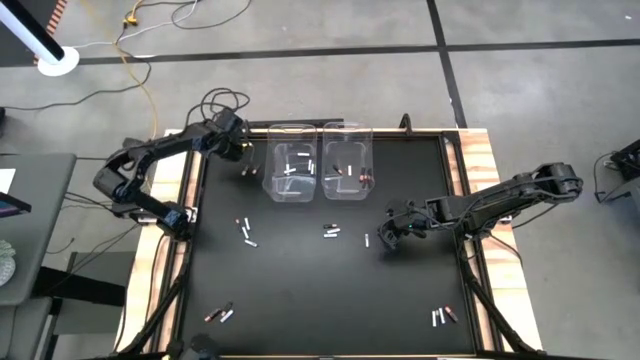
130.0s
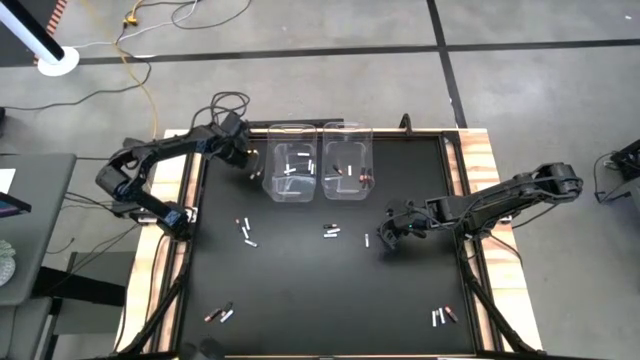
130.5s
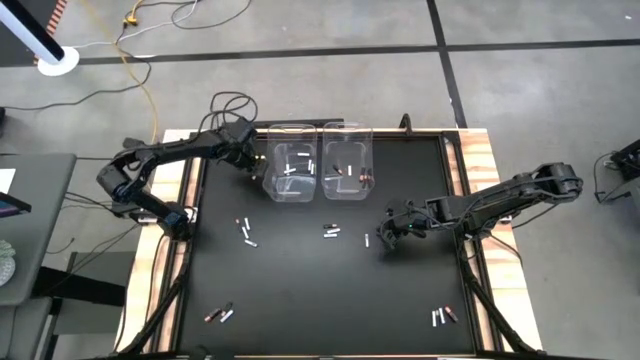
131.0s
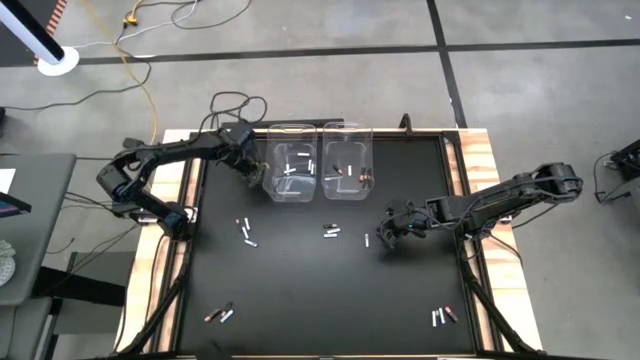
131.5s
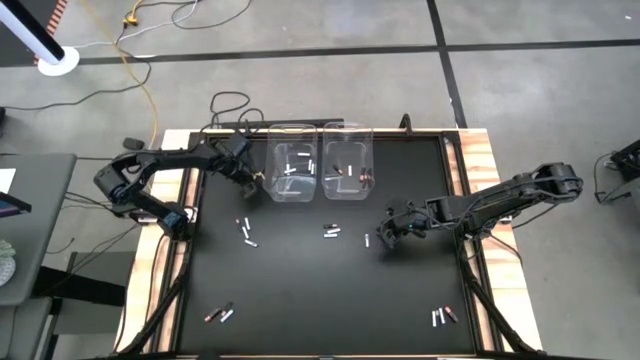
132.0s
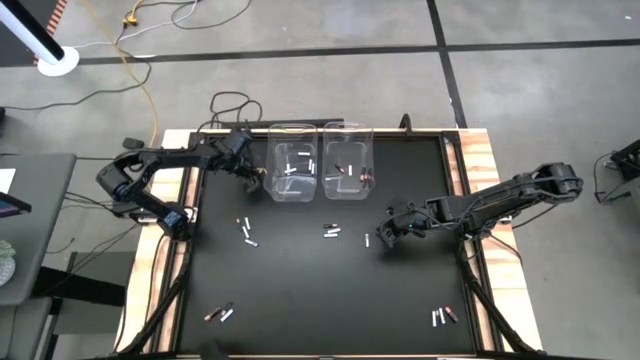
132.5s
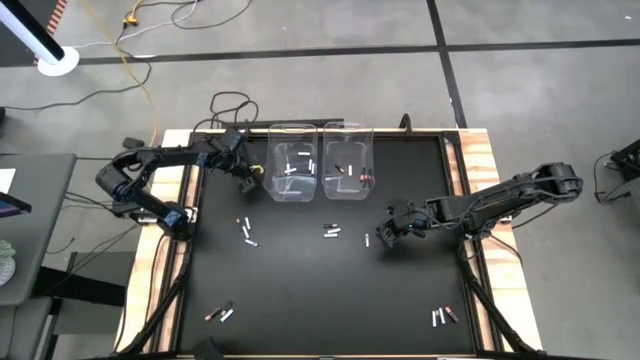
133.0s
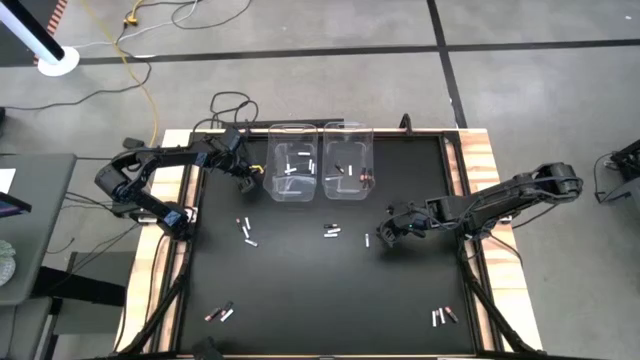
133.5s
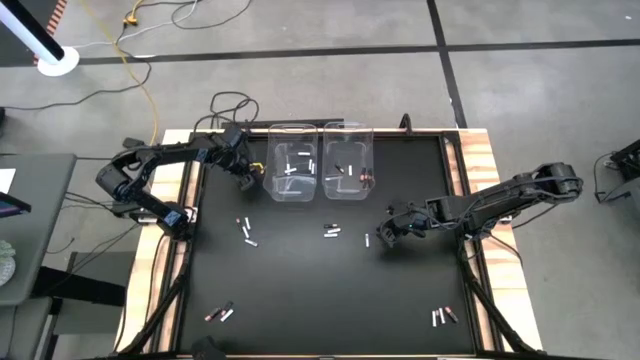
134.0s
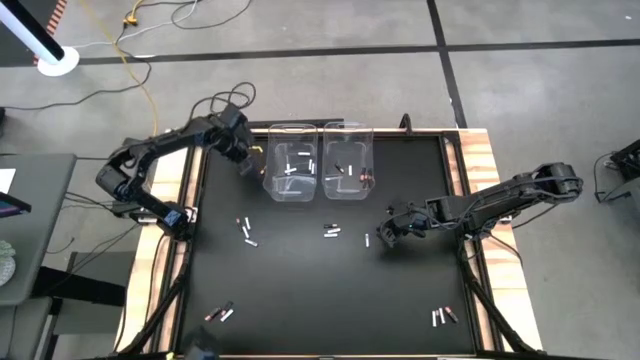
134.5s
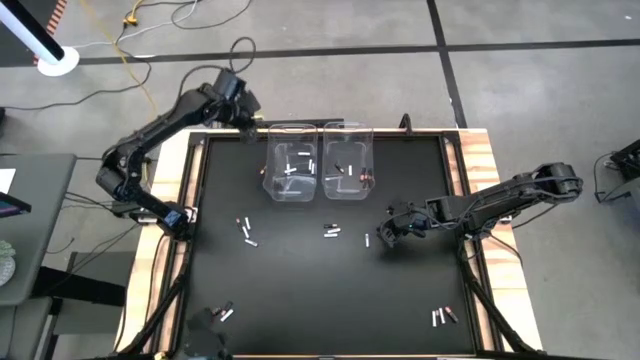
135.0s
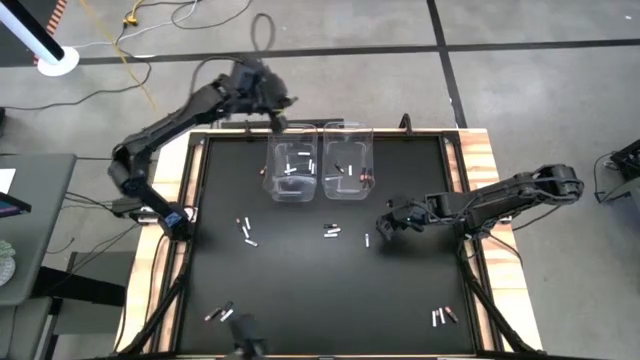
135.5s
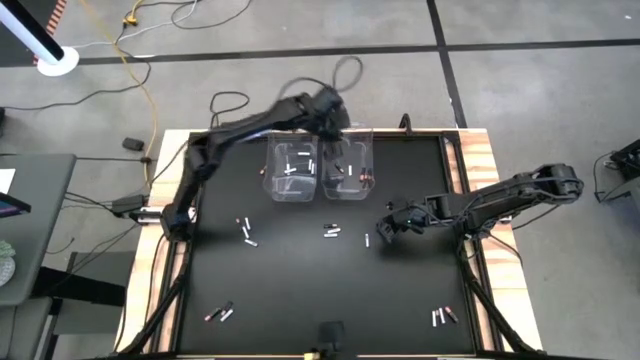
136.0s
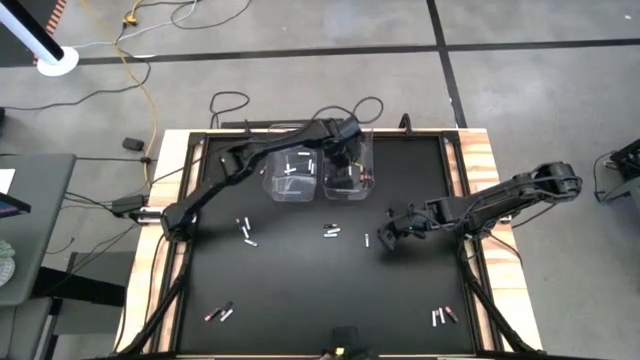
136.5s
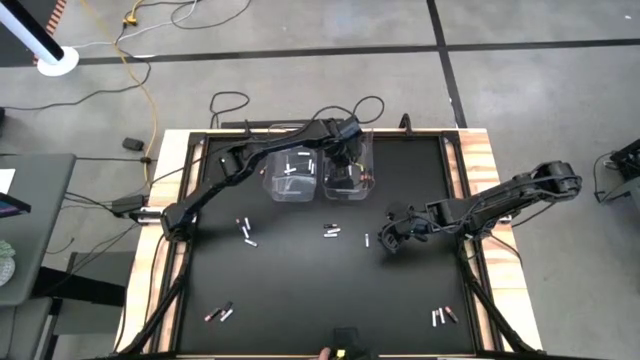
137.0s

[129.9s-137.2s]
Task: Sort batteries
Put the black battery into the right transparent bin

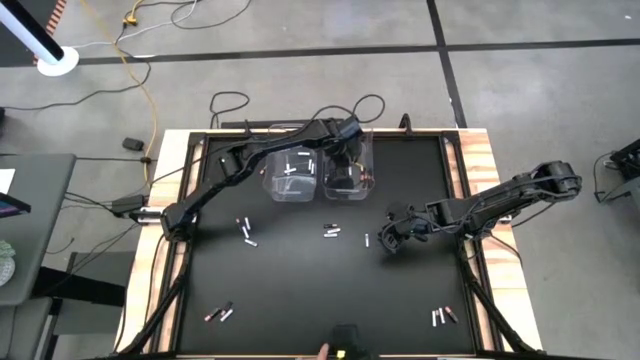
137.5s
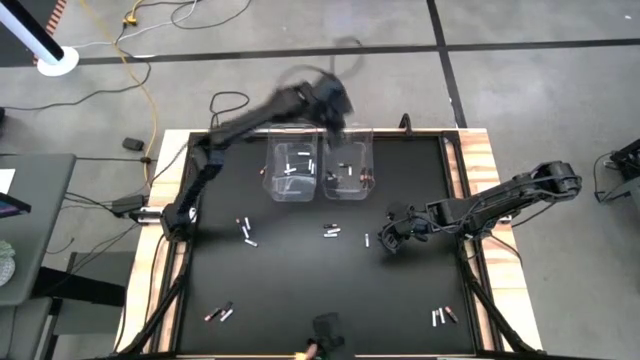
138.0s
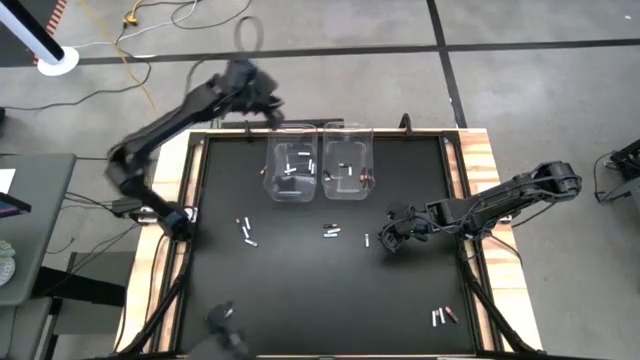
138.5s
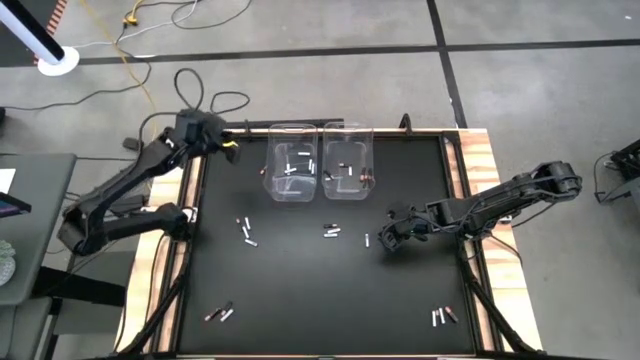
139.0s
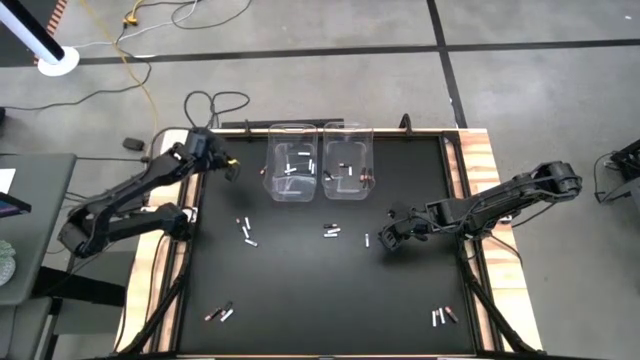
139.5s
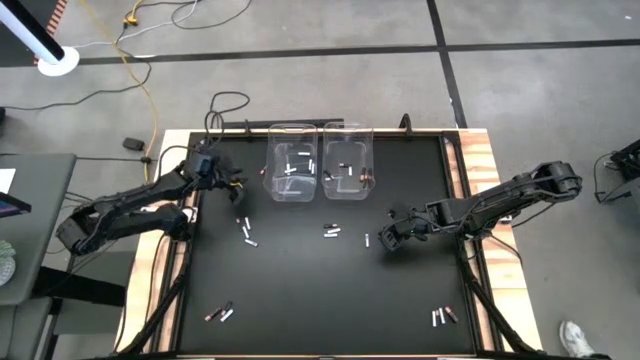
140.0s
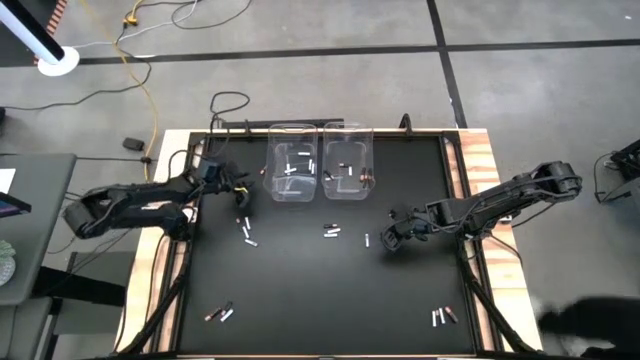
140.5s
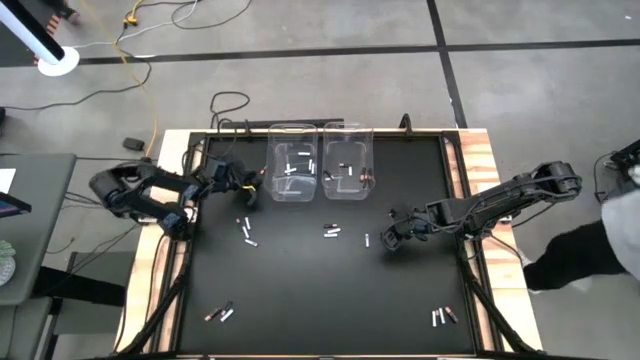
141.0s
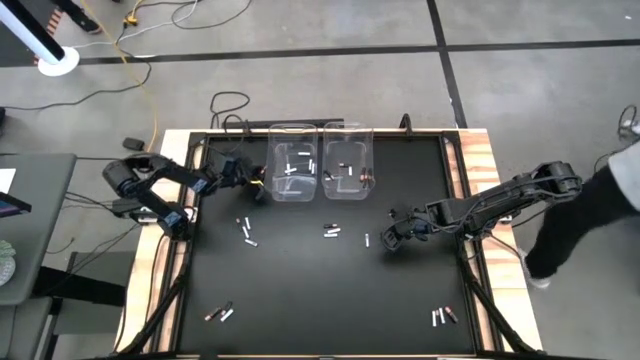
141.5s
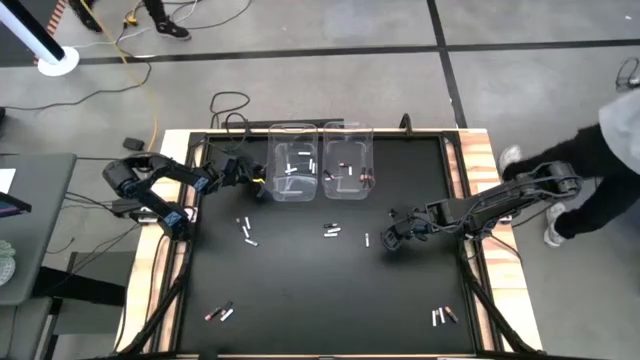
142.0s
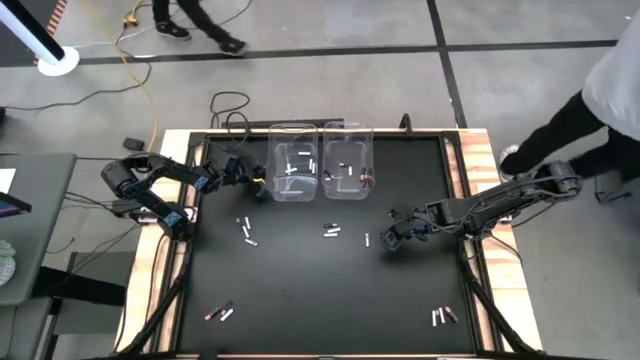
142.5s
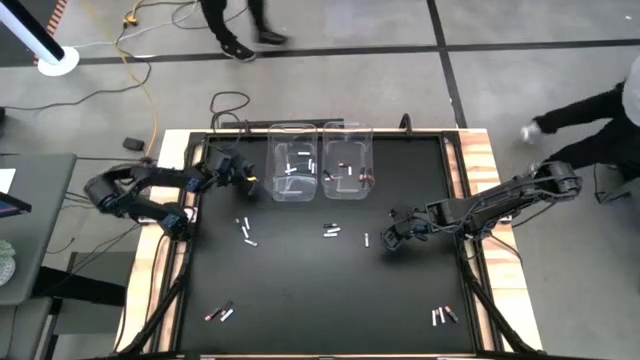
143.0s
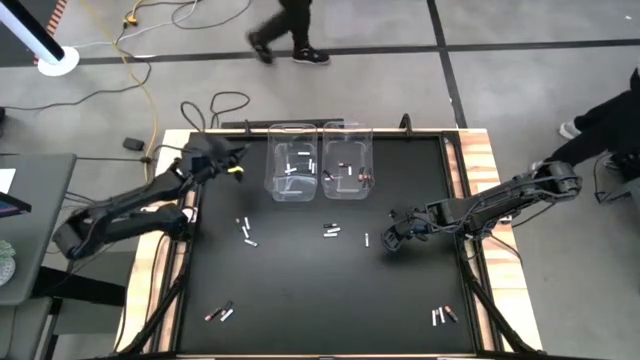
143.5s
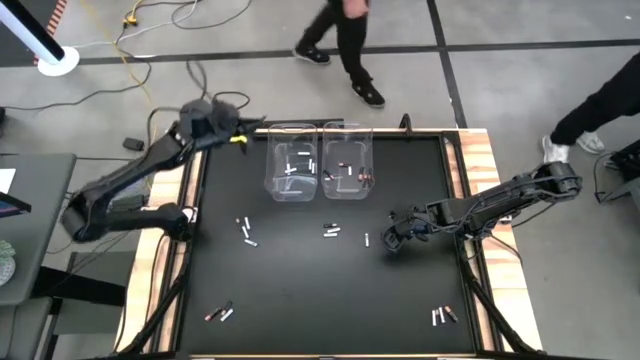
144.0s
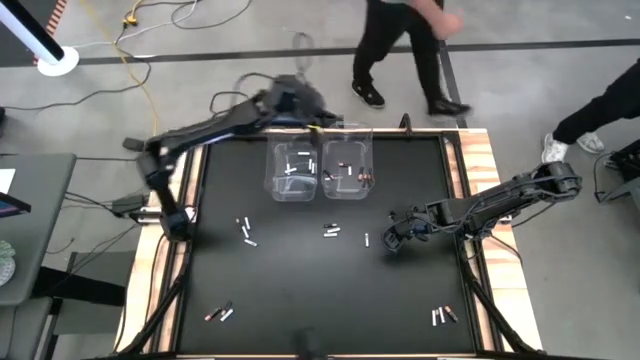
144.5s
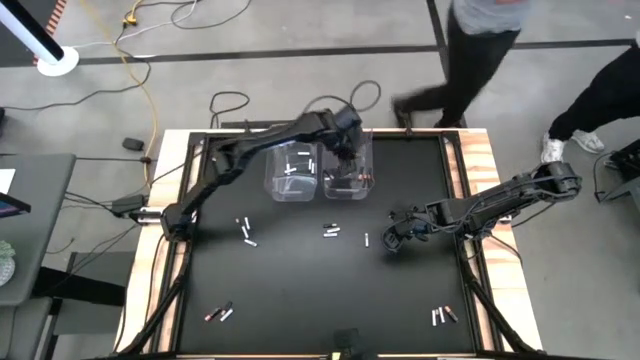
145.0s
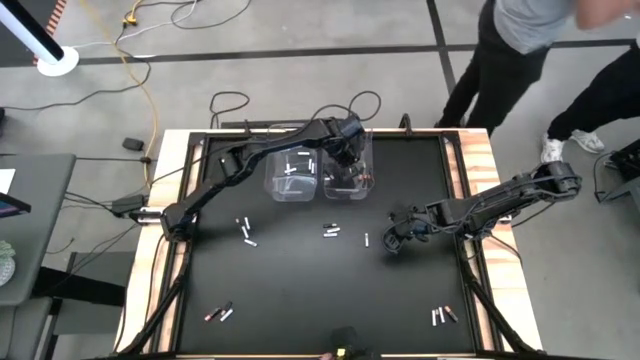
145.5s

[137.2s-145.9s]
Put the black battery into the right transparent bin

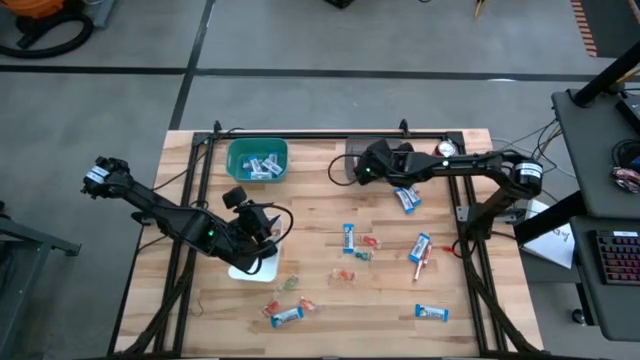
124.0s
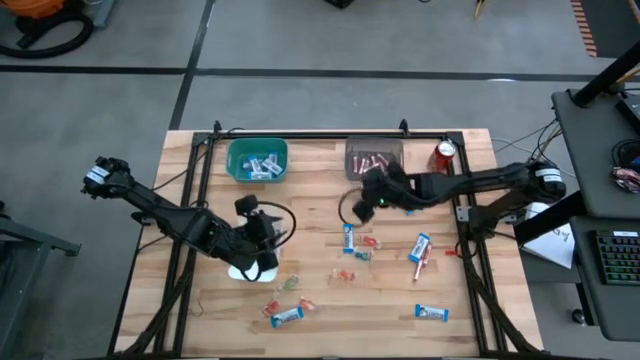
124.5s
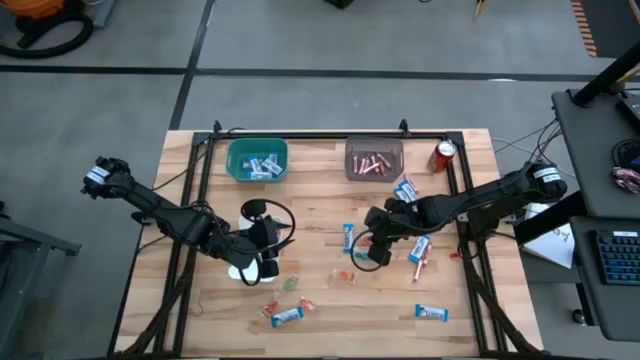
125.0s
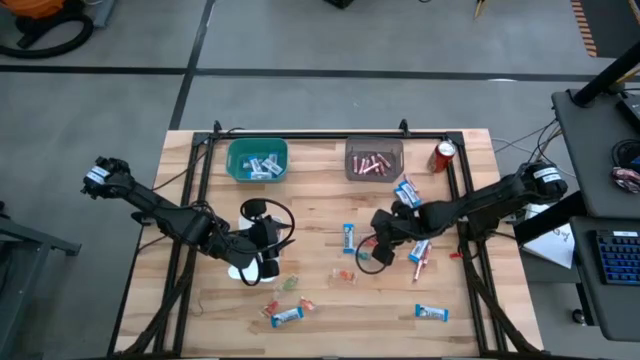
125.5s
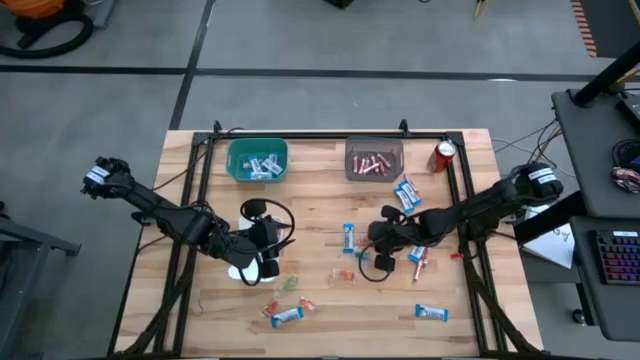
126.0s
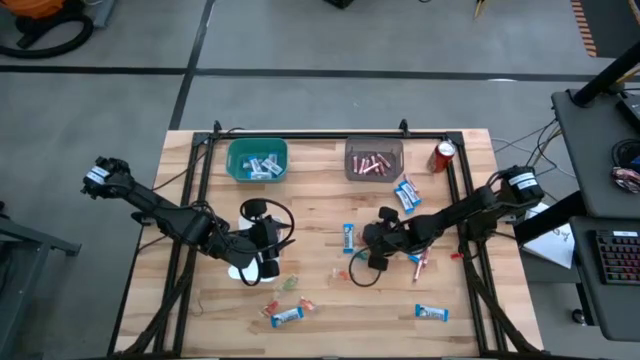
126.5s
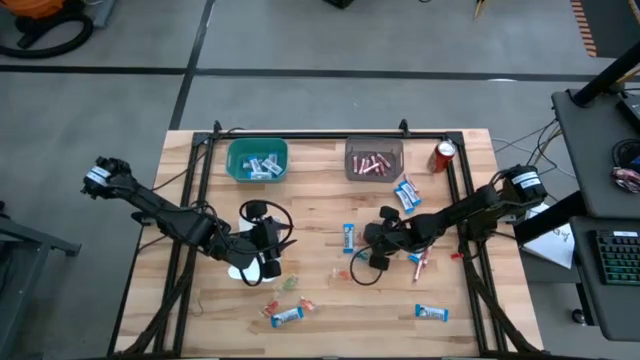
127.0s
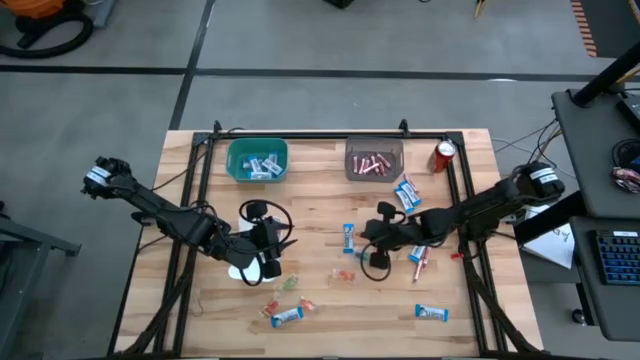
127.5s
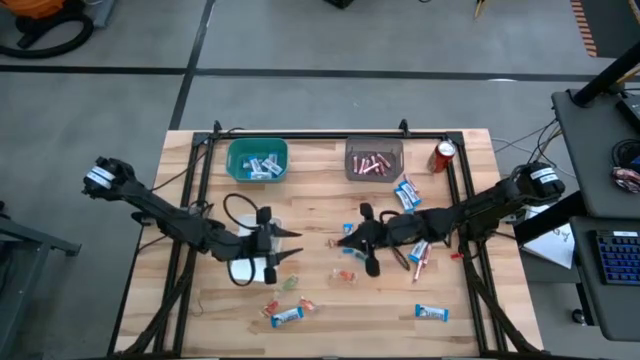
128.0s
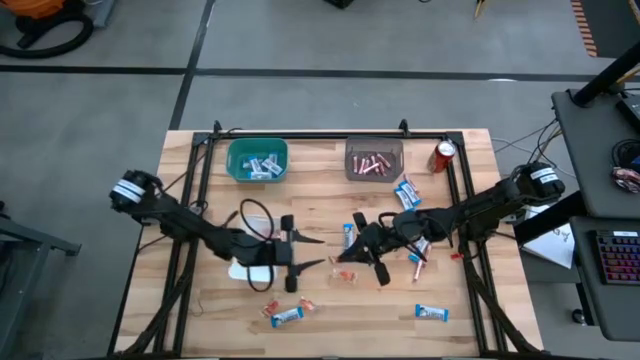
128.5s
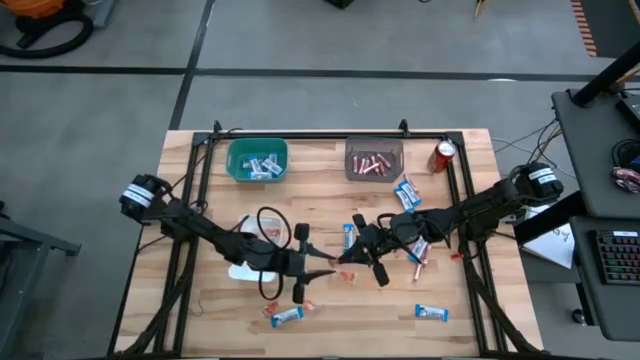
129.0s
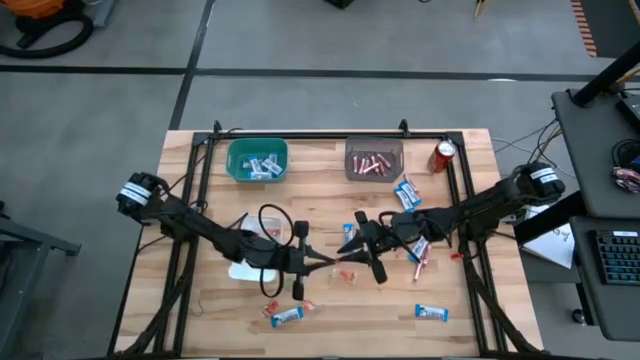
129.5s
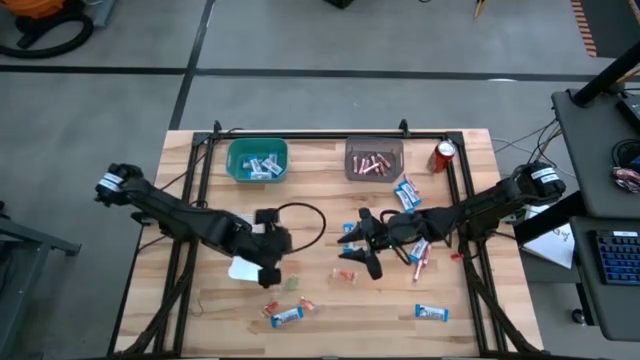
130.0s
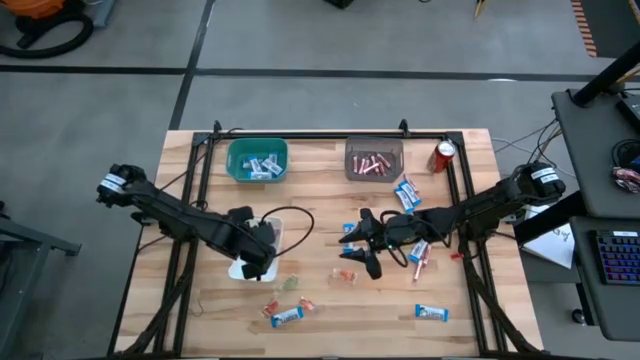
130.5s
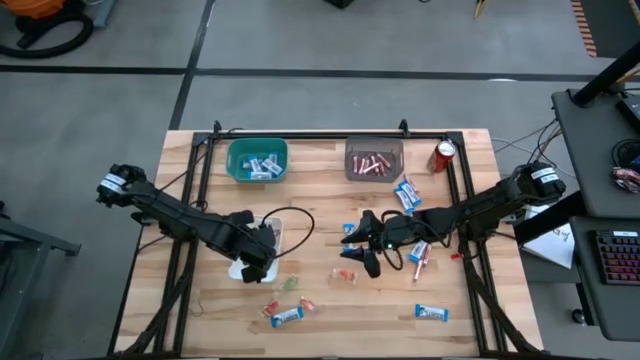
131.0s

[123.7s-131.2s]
Task: Sort candy
Put the orange gummy candy into the white bin
